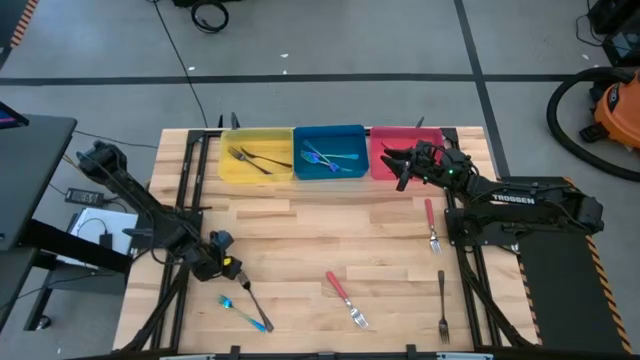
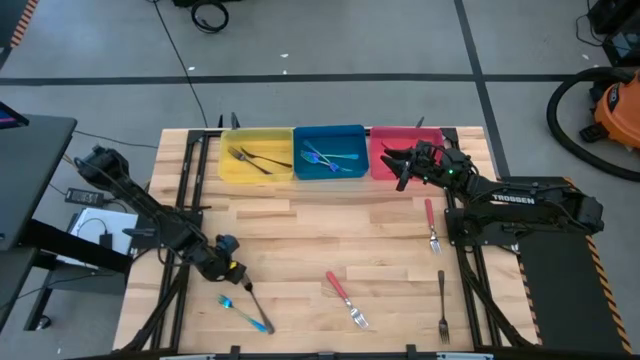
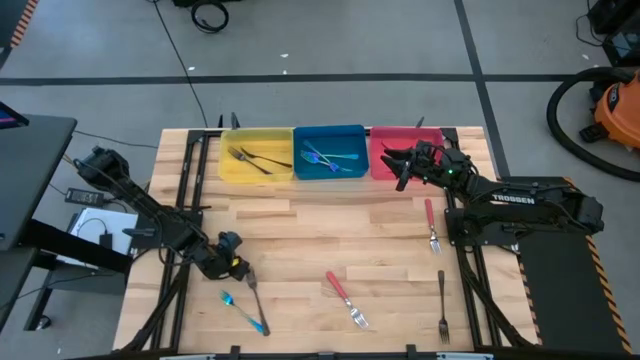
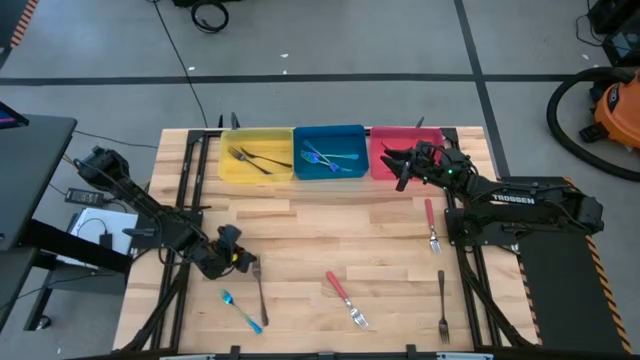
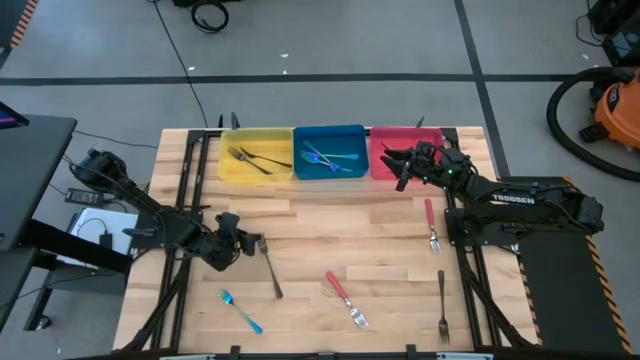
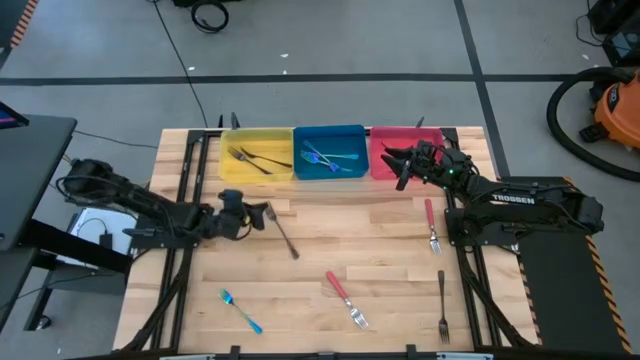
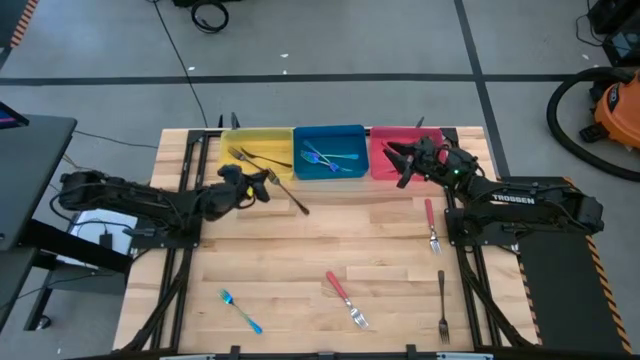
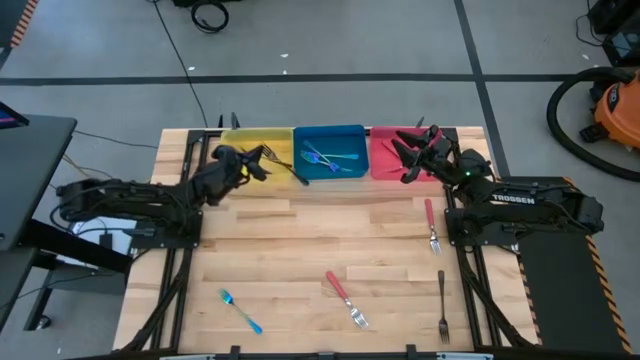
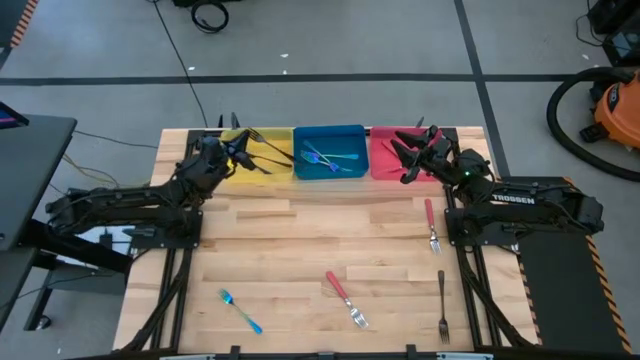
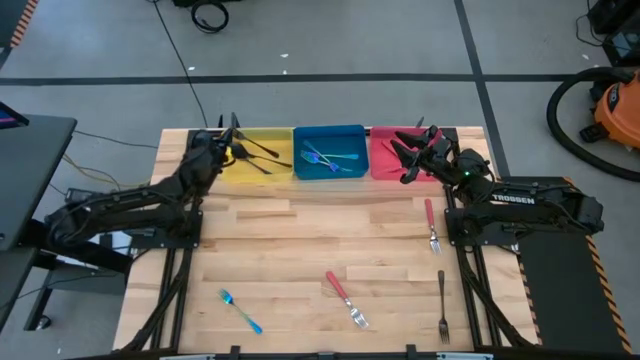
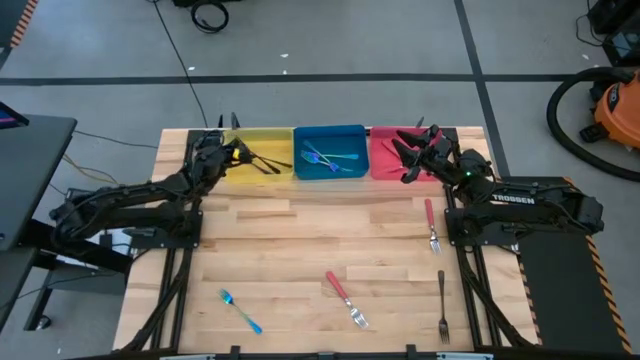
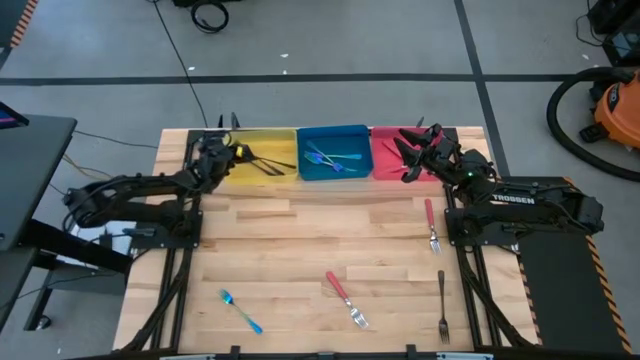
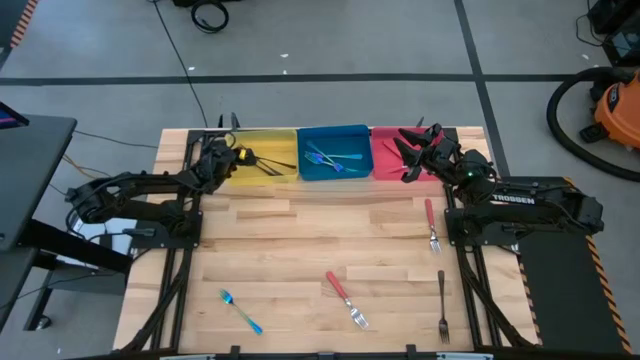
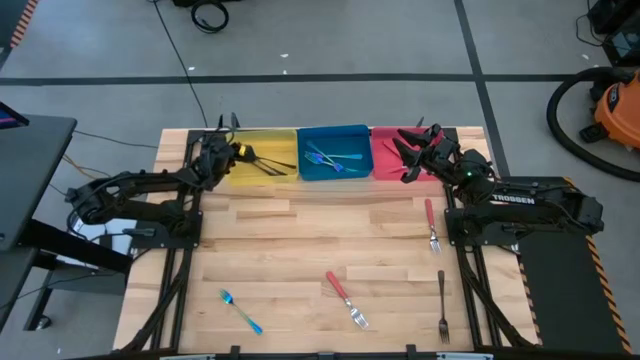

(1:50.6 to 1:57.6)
Task: Sort silverware by color (type)
Put the left black fork into the yellow bin

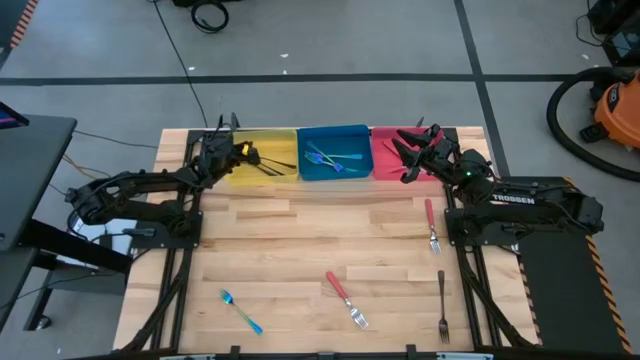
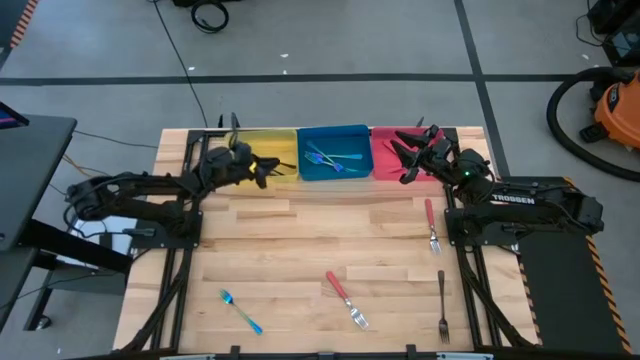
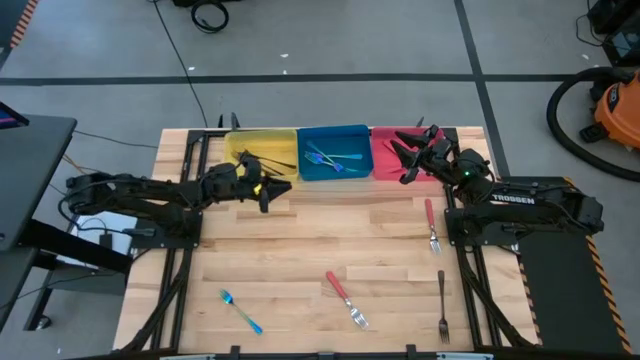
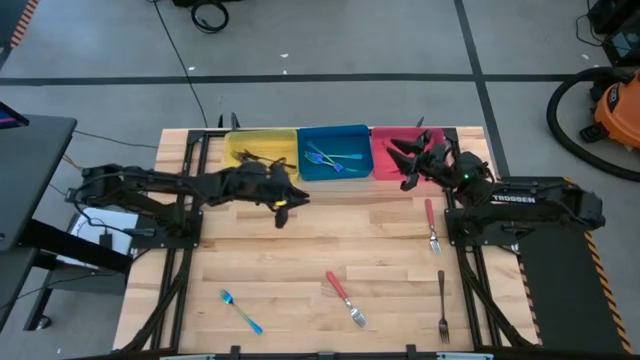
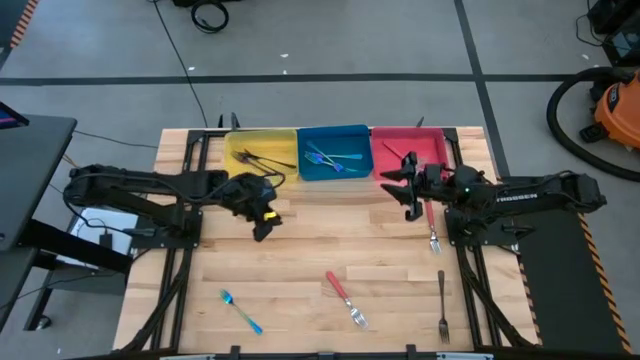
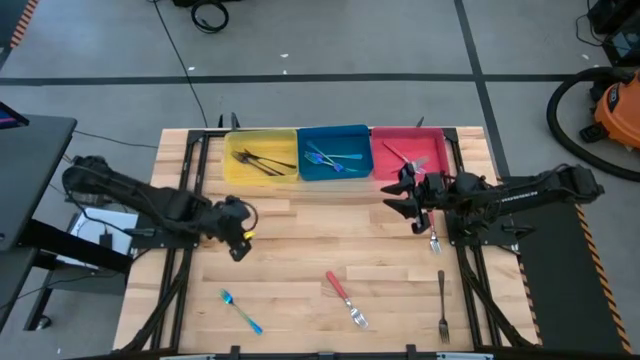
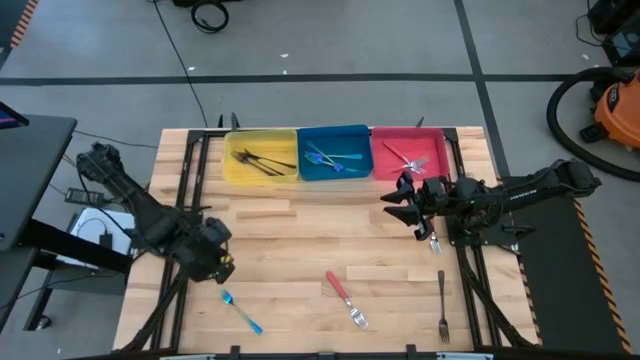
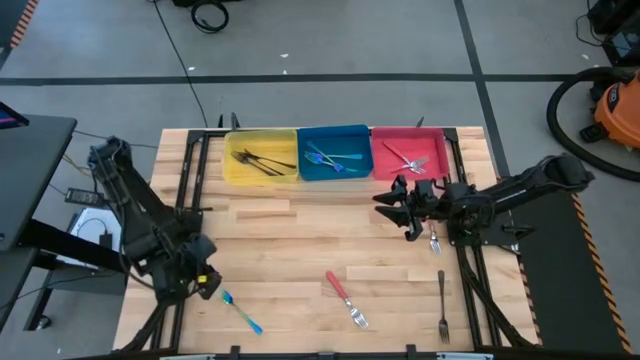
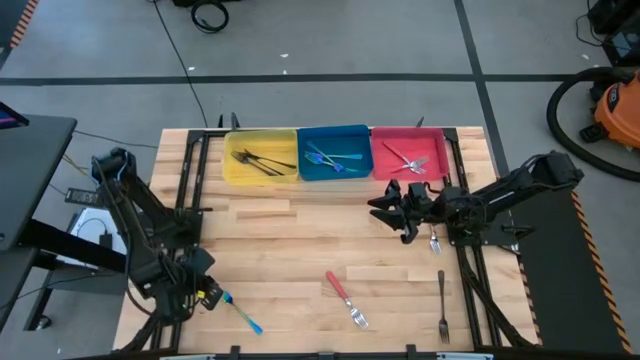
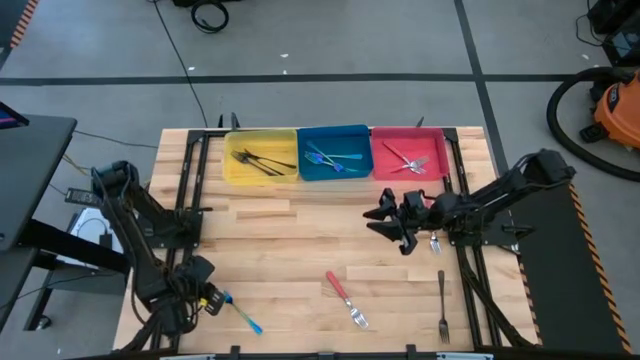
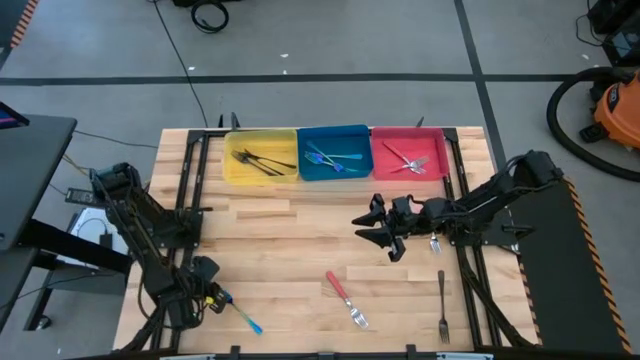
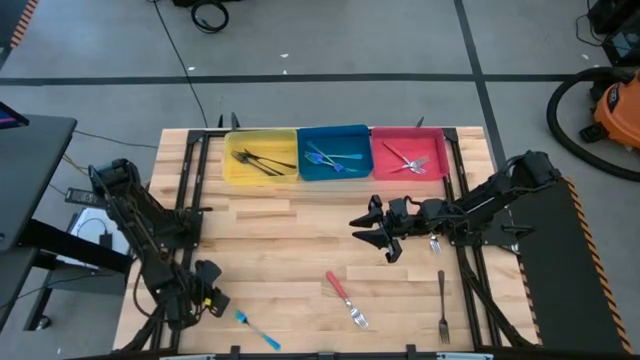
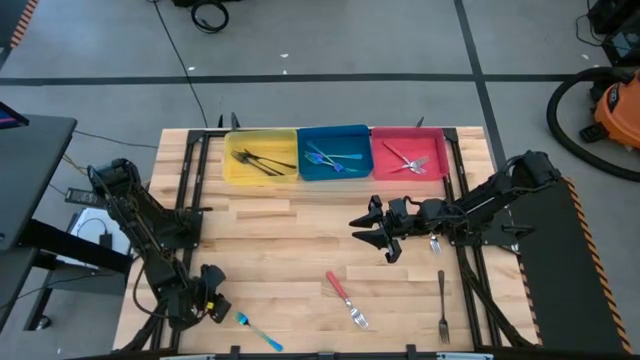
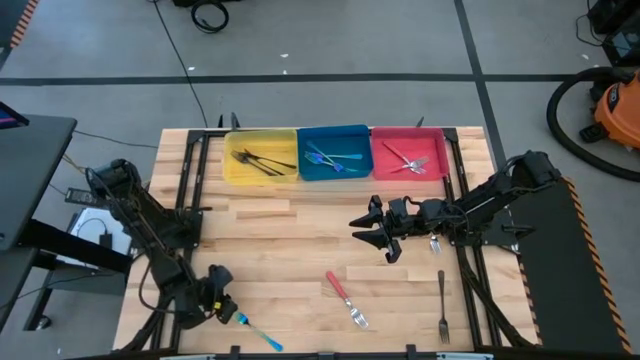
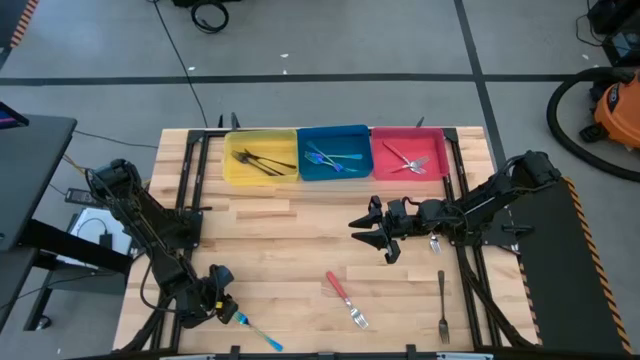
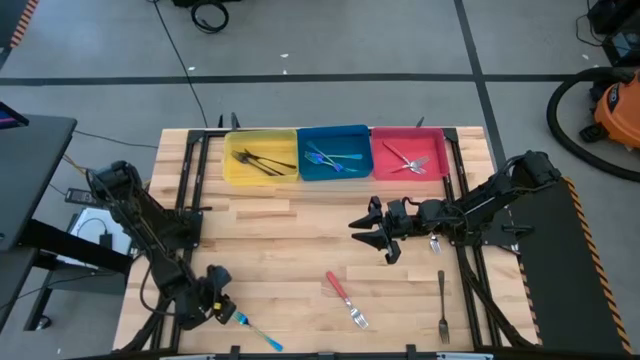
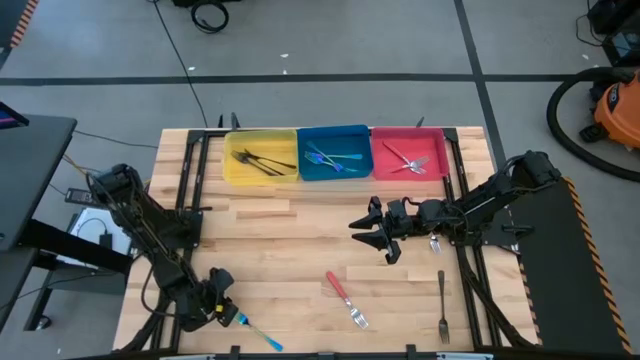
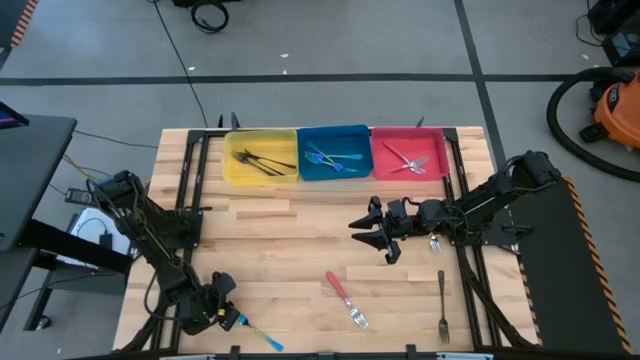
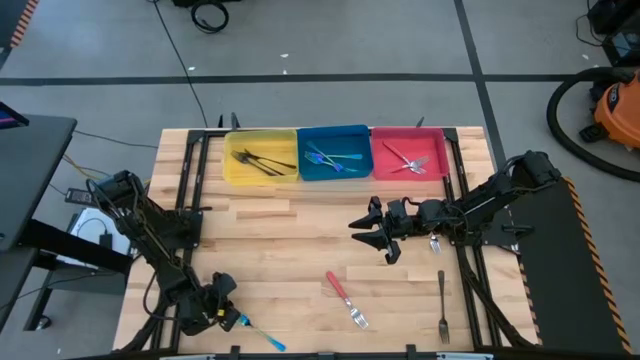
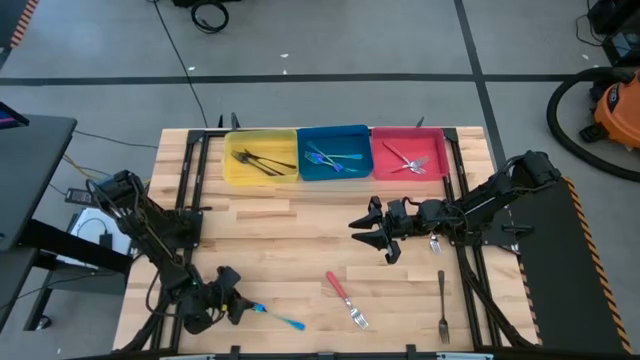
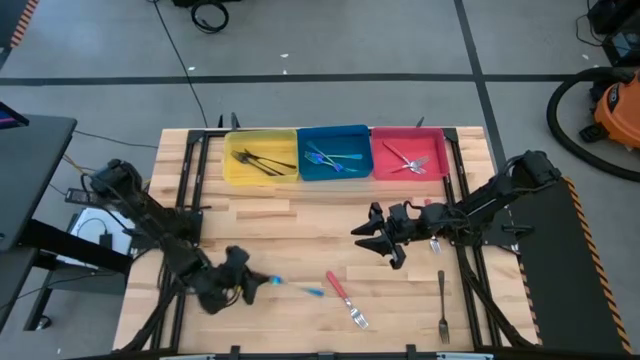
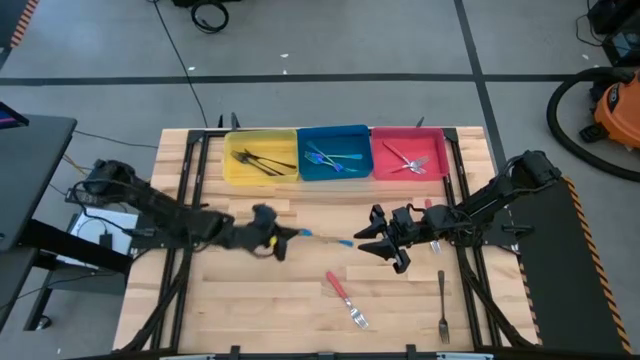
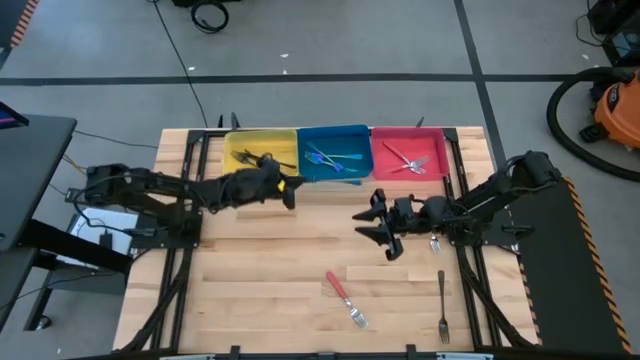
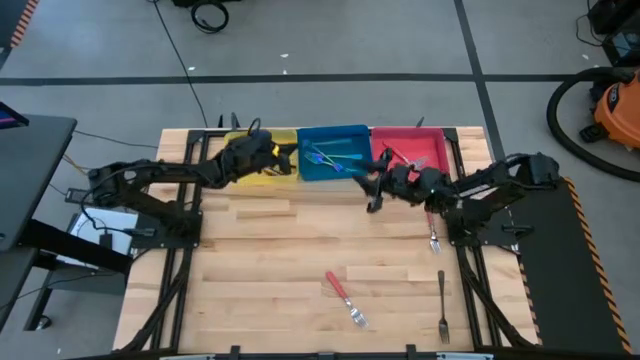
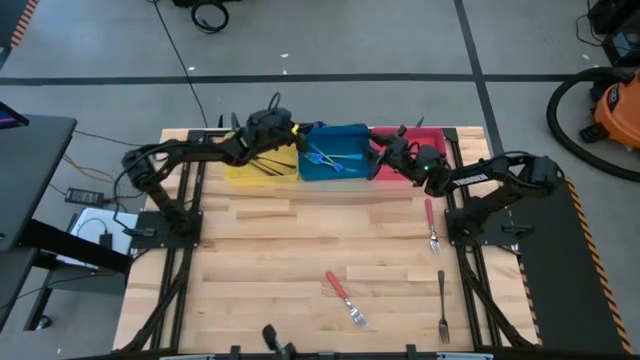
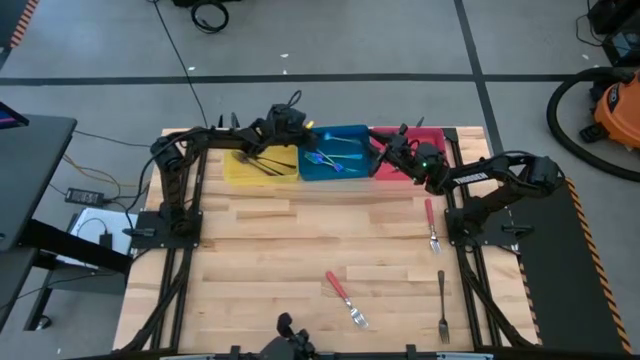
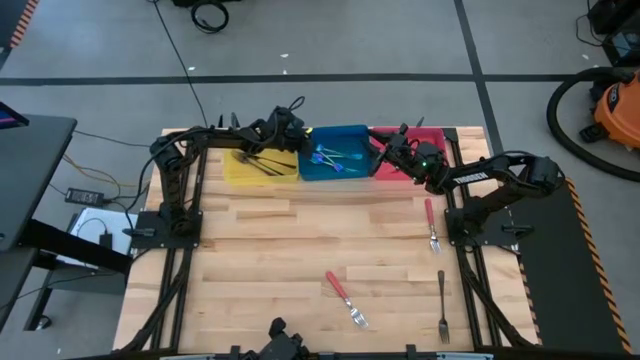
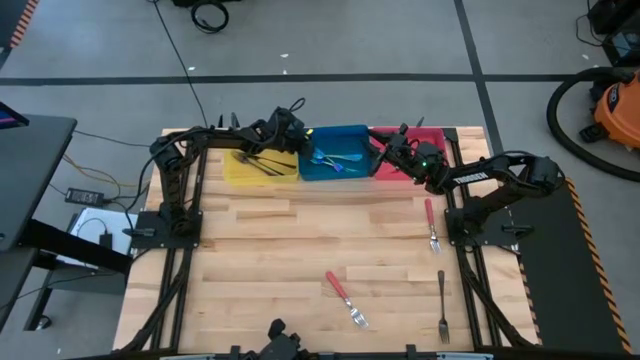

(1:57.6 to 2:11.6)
Put the blue fork into the blue bin
